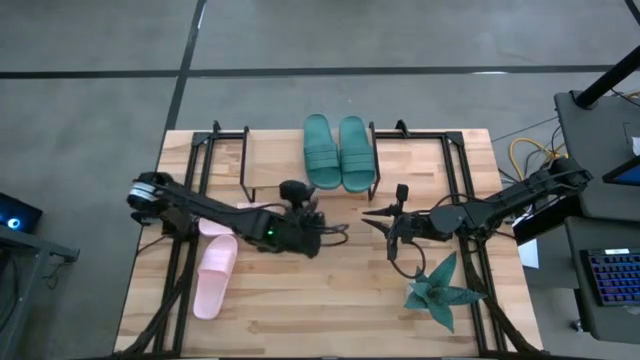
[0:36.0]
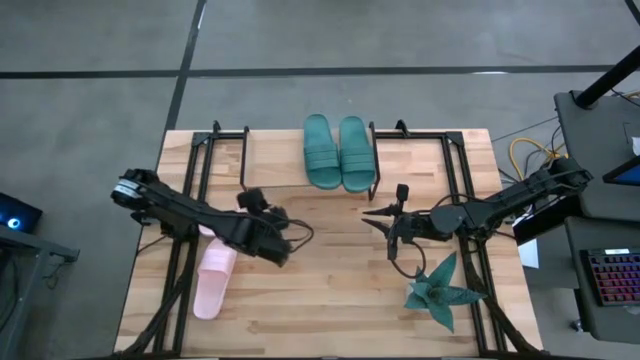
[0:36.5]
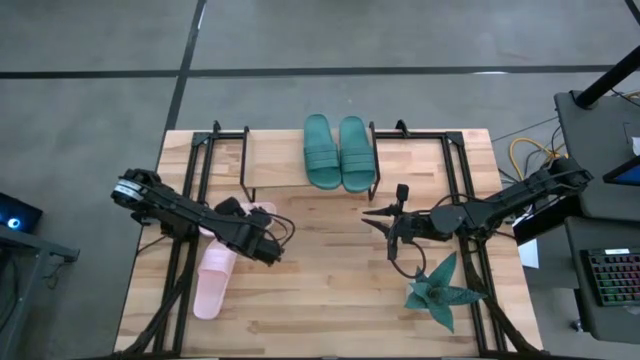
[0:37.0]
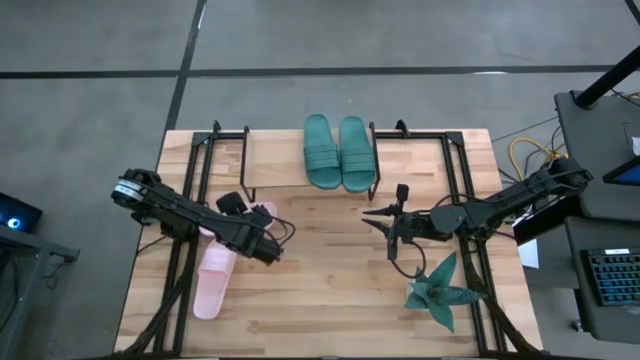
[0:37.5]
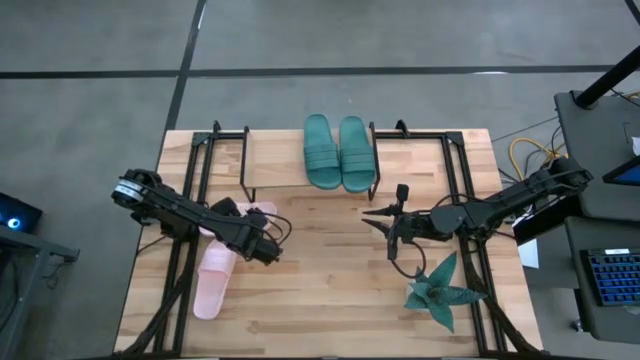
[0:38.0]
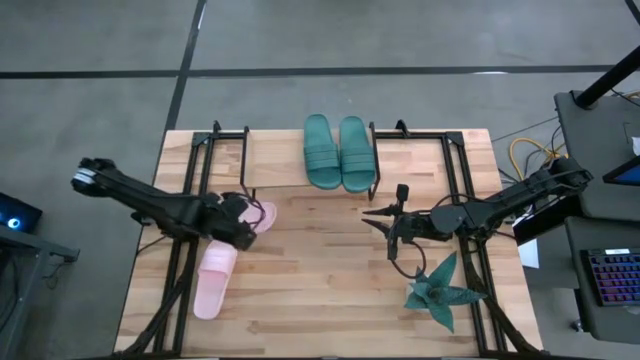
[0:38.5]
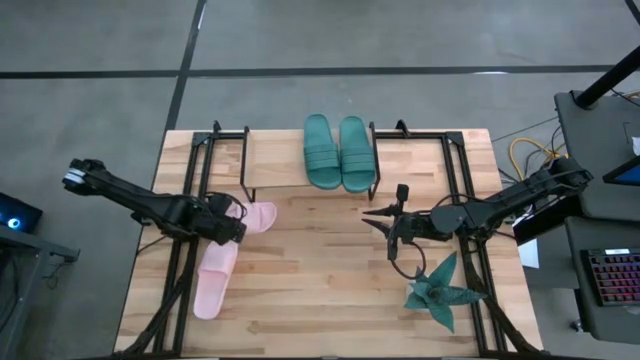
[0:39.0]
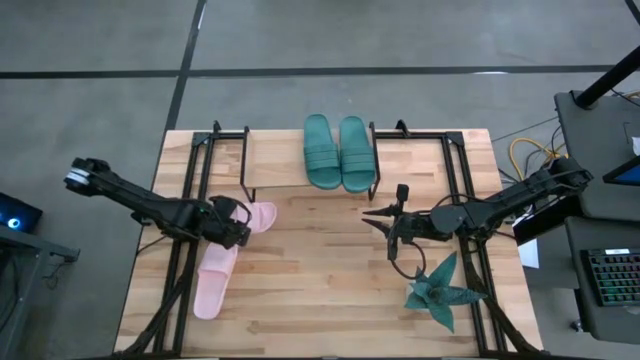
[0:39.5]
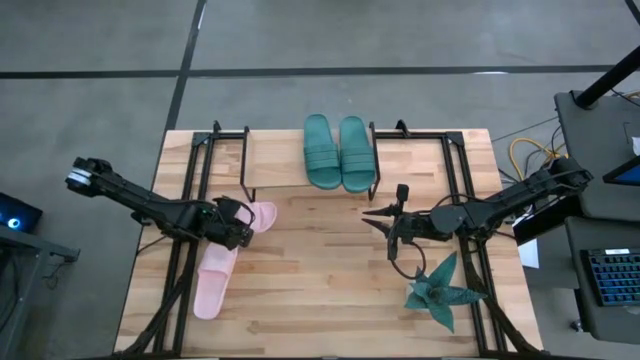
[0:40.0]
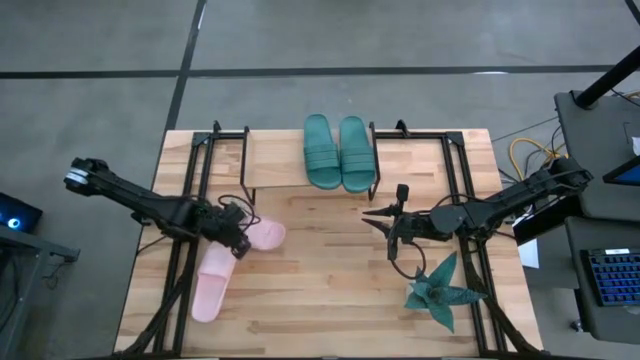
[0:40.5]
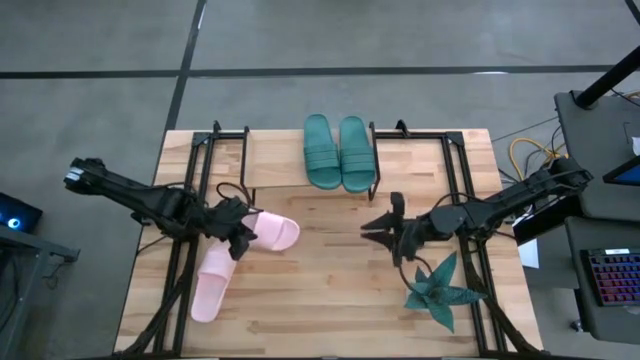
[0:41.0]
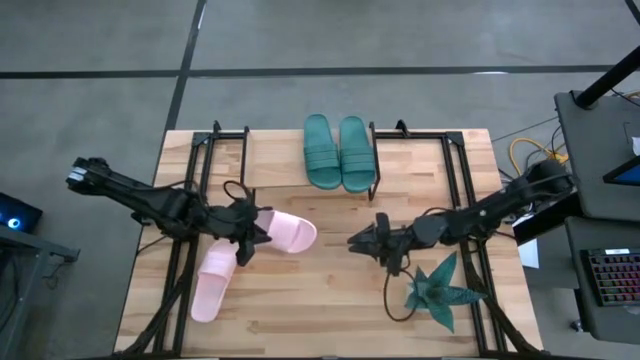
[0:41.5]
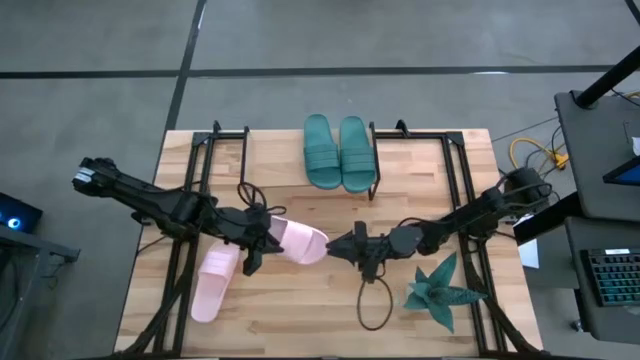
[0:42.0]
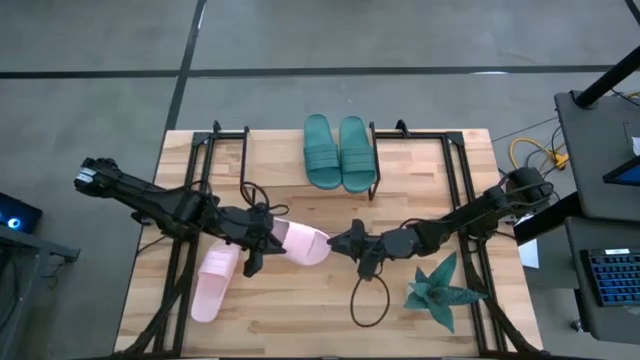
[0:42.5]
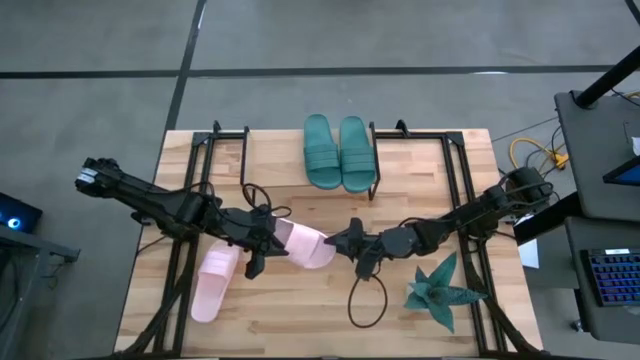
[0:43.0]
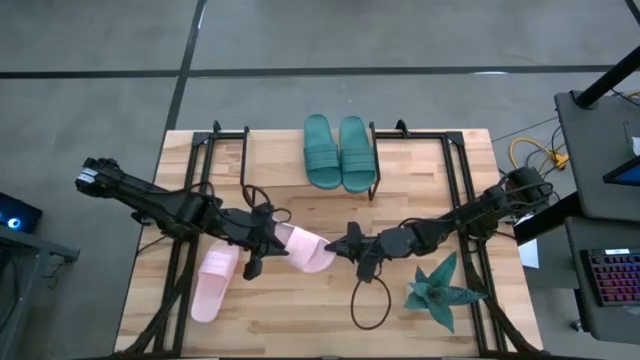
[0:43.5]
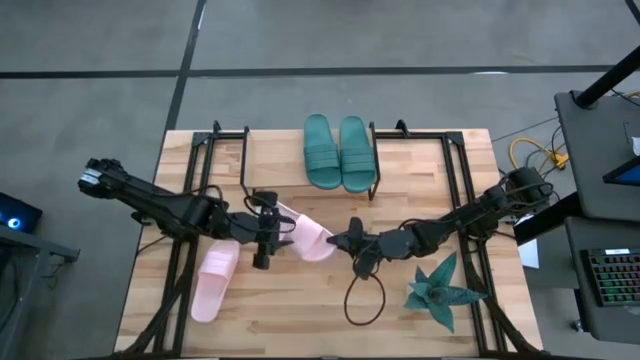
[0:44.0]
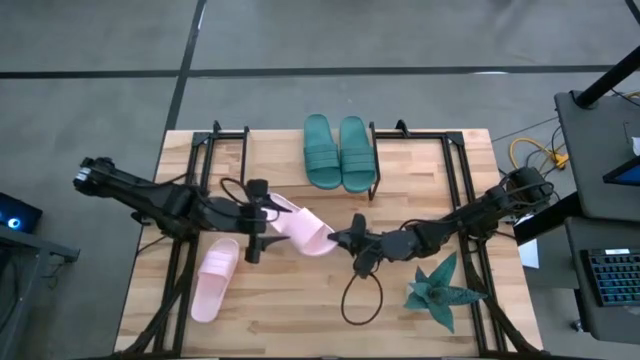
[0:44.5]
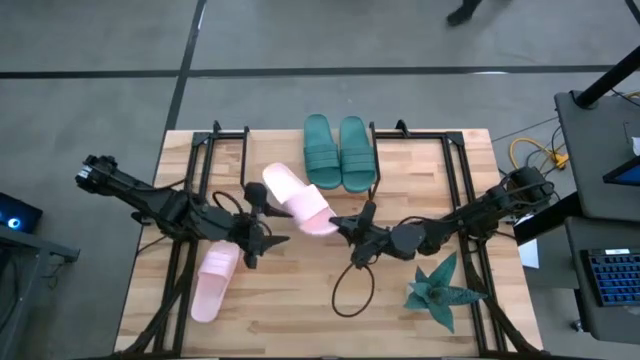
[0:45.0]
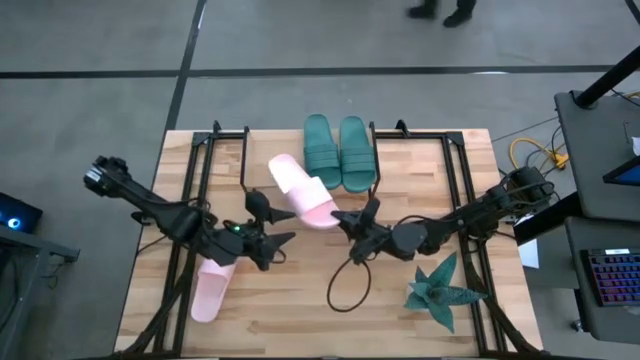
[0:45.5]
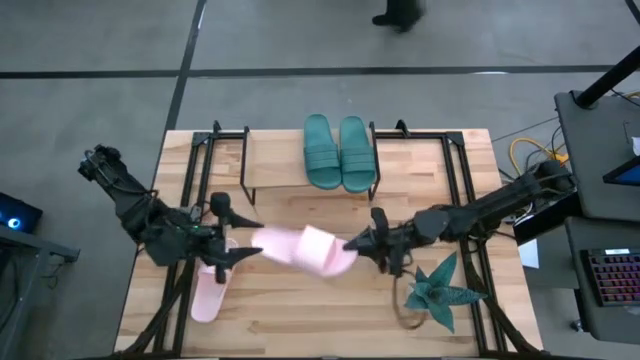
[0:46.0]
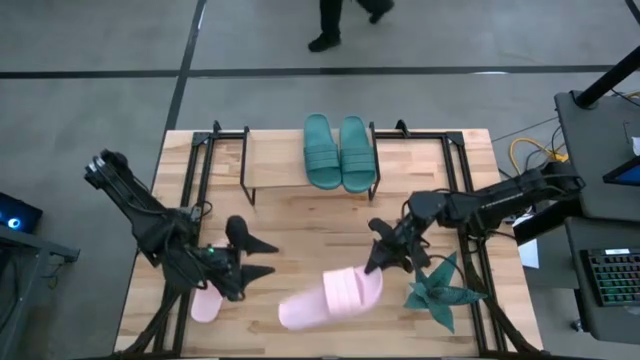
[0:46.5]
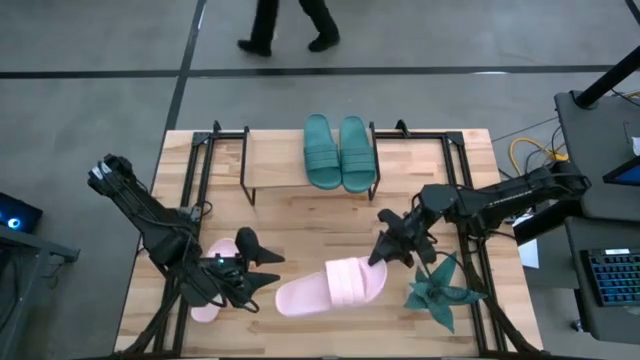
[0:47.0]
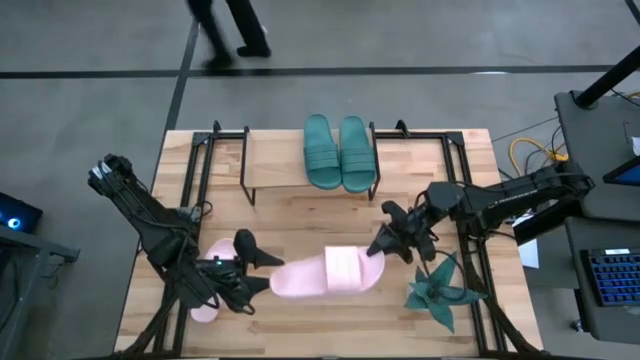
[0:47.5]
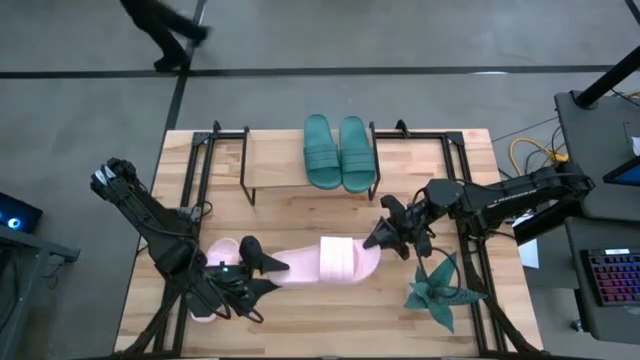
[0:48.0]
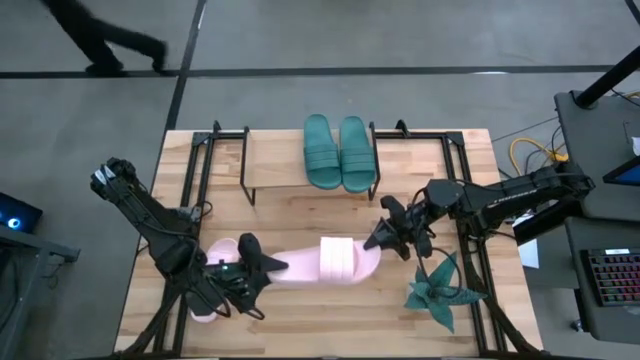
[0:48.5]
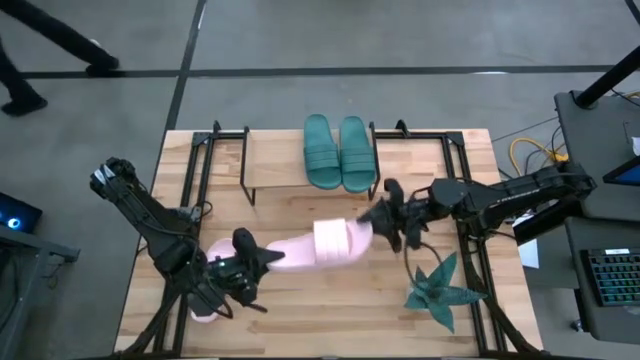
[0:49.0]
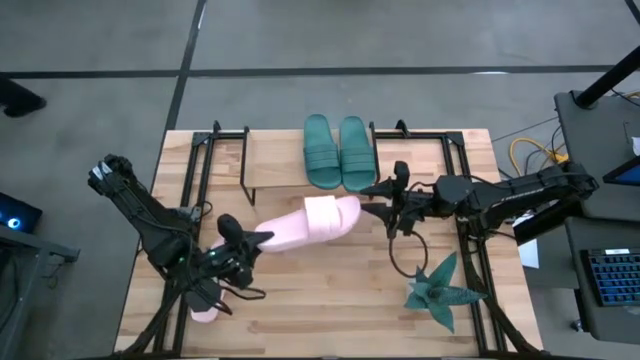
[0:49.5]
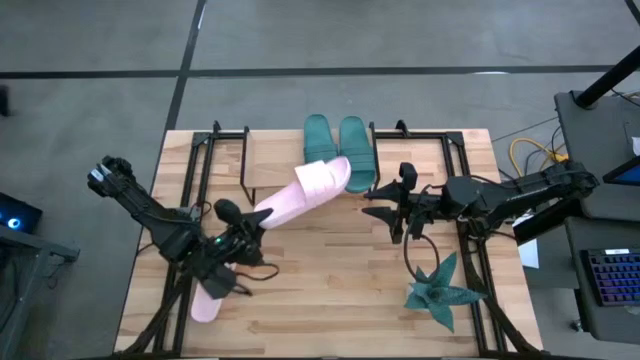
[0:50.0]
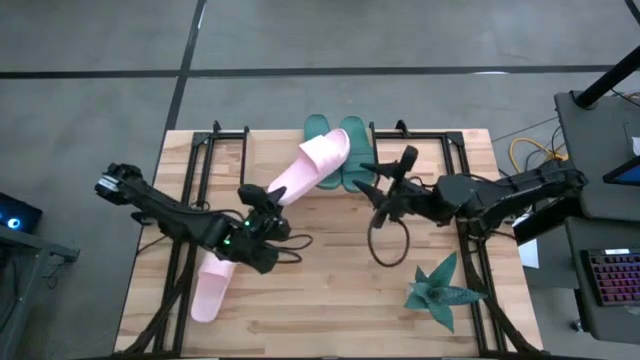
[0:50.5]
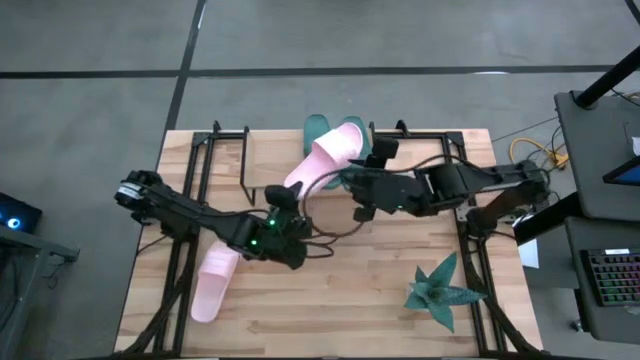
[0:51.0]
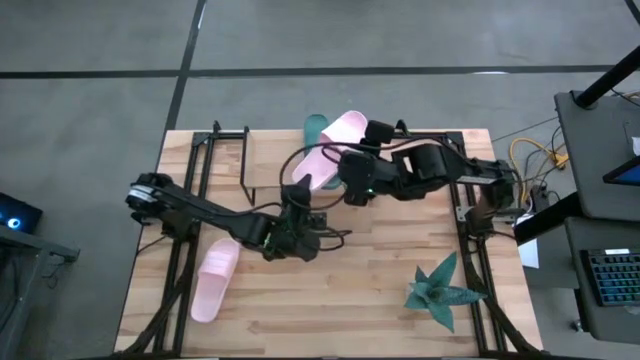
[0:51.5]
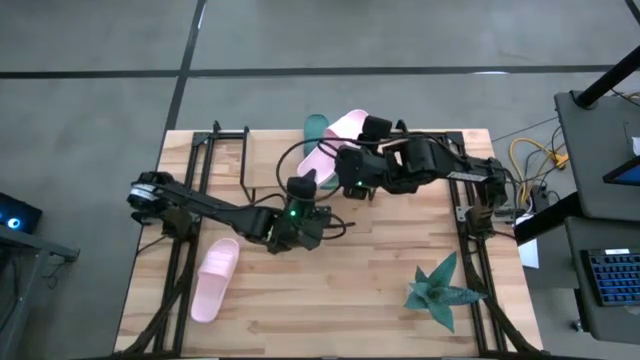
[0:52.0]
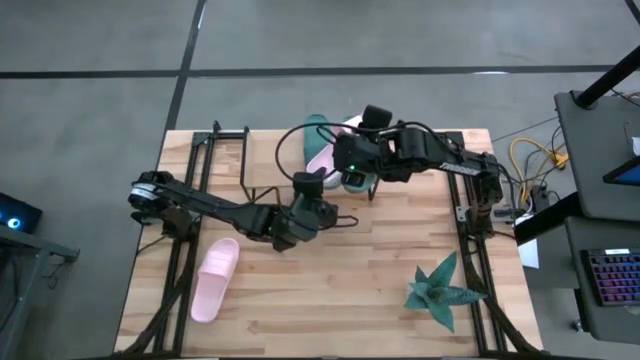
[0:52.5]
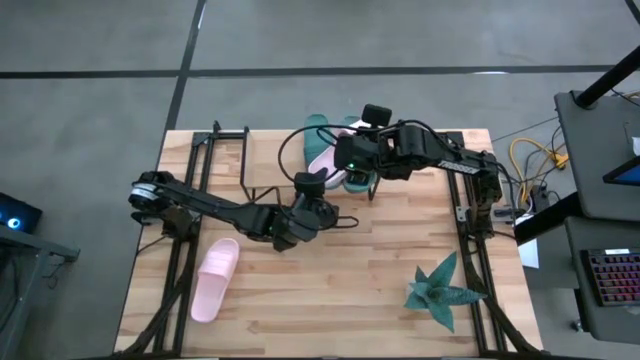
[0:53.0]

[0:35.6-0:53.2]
Task: Pick and place slides into the shelf
Put the top pink slipper on the shelf

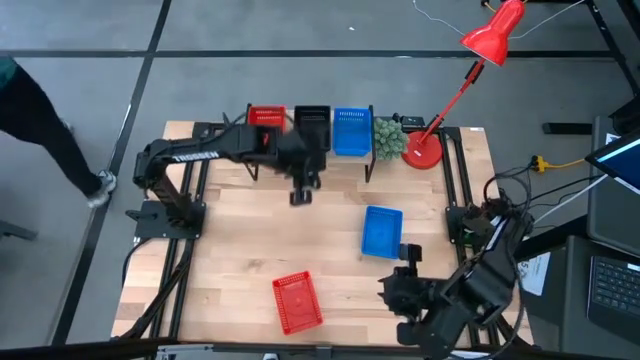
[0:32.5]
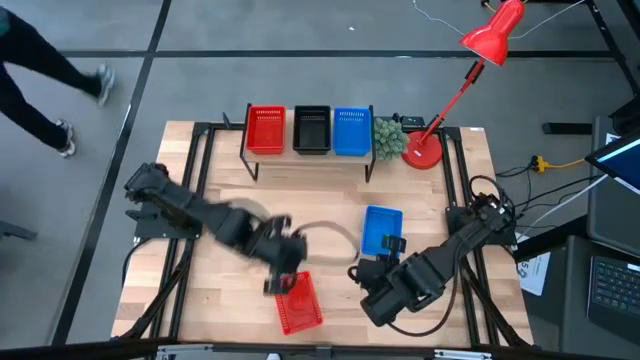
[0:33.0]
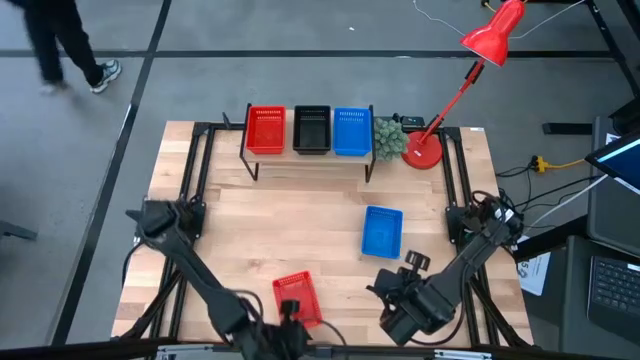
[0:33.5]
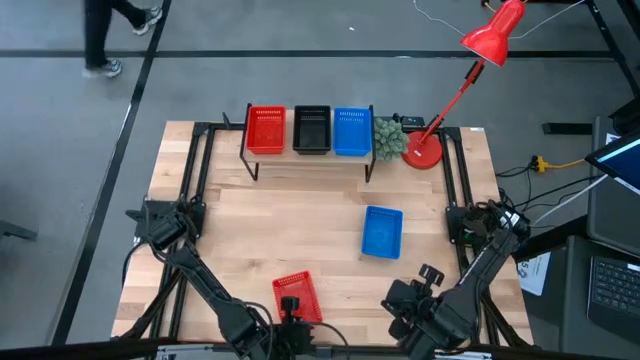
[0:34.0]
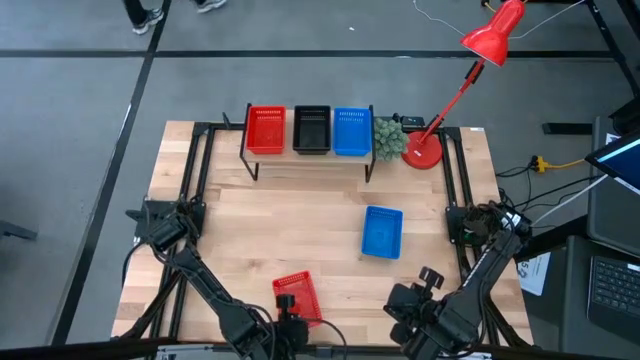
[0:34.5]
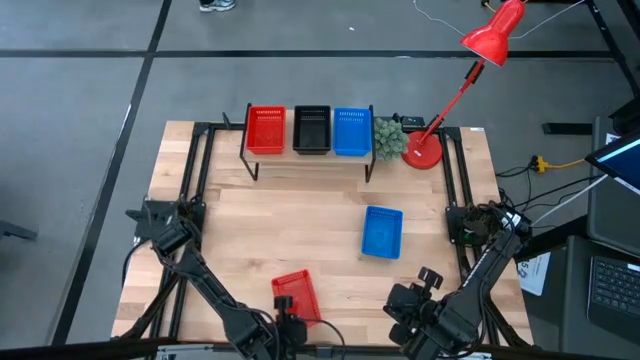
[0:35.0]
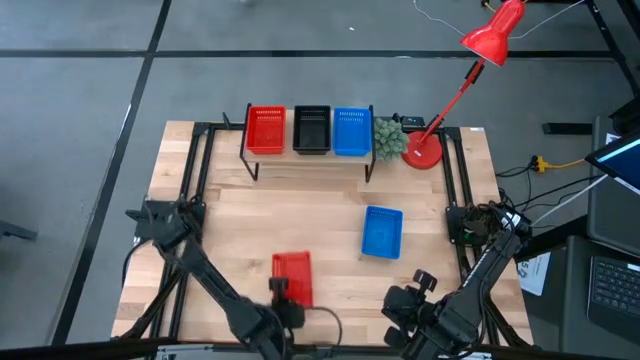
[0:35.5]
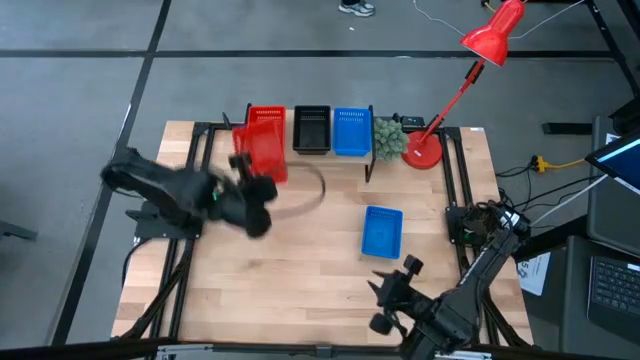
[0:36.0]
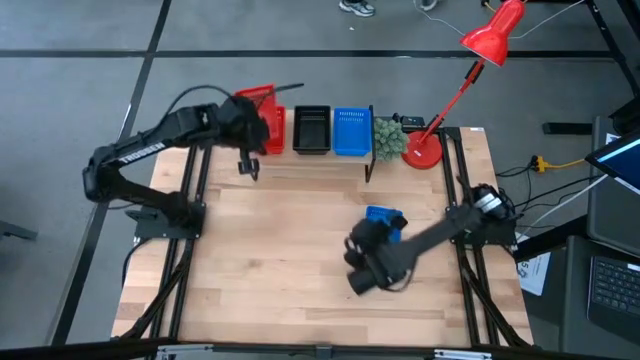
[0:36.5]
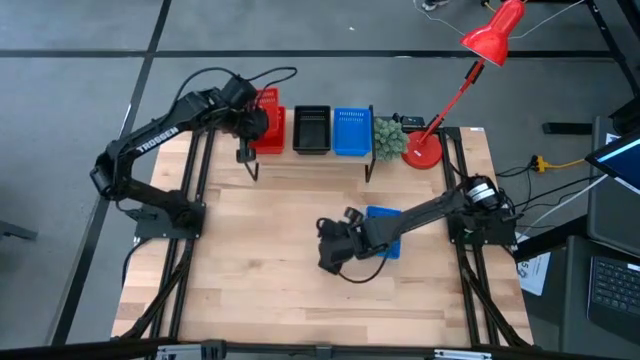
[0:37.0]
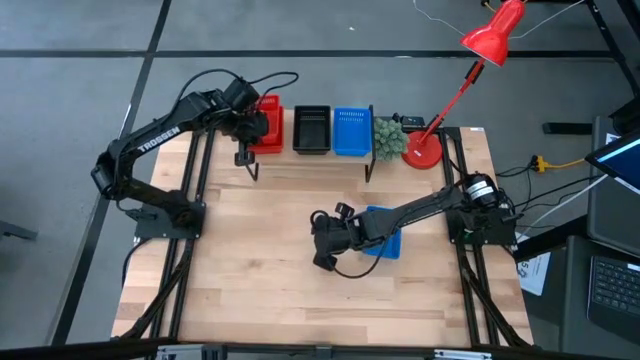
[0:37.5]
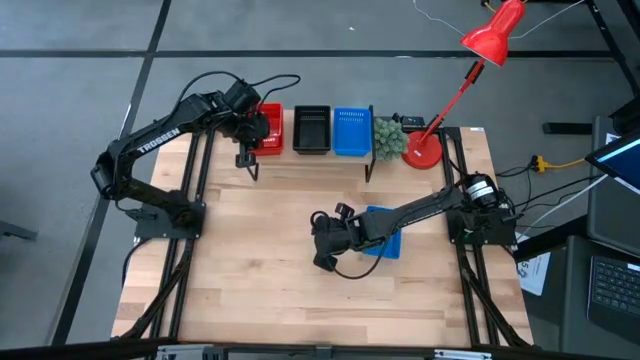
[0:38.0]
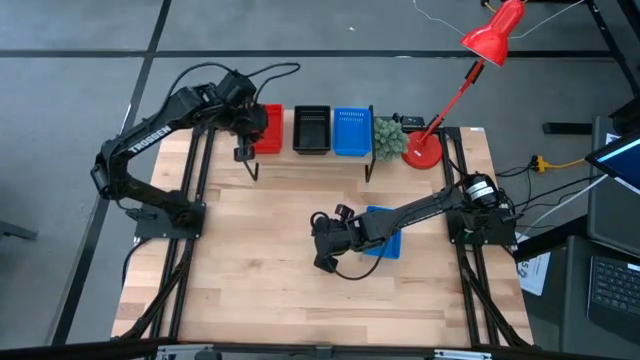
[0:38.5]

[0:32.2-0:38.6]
Task: Stack baskets on shelf by color
Stack the red bin on top of the red bin on the shelf
